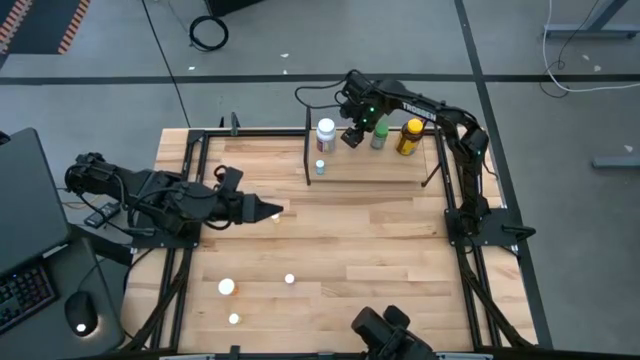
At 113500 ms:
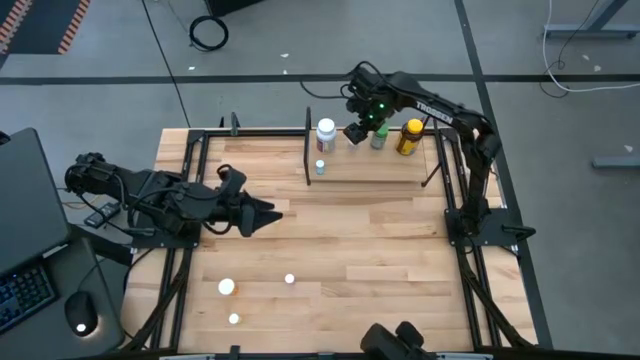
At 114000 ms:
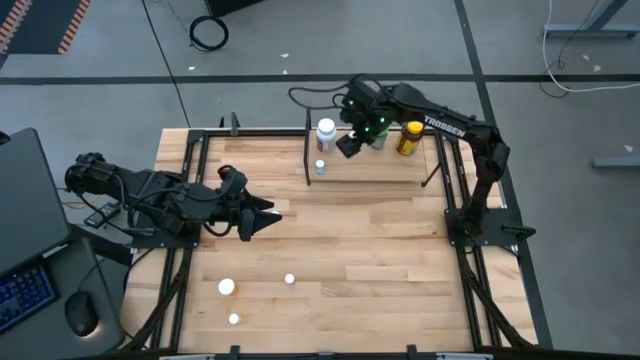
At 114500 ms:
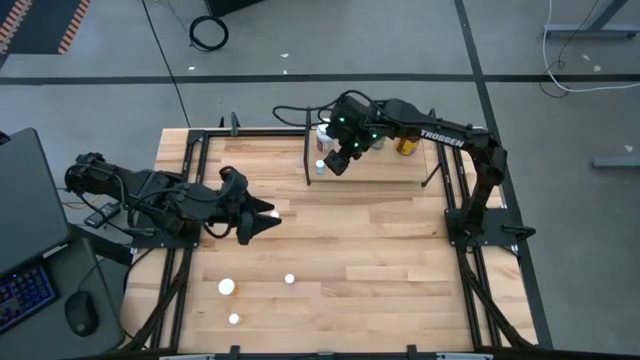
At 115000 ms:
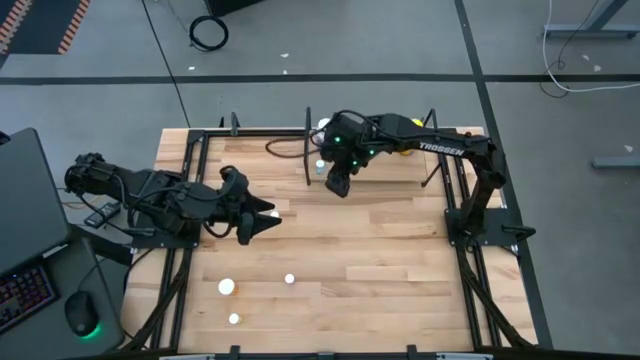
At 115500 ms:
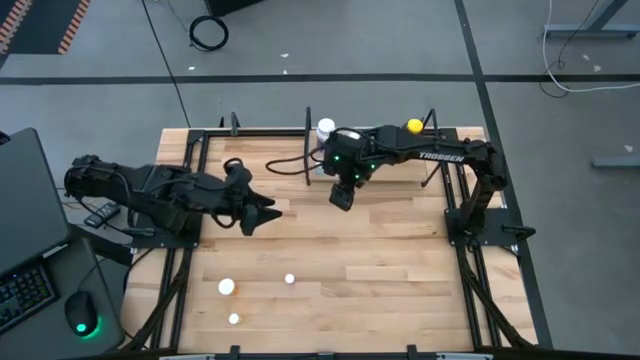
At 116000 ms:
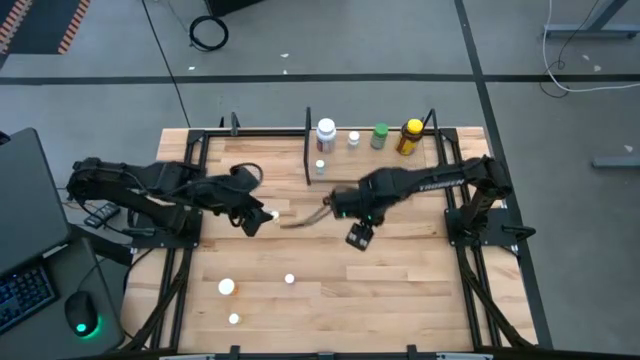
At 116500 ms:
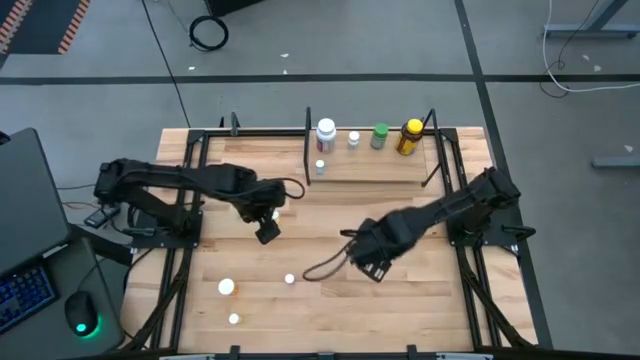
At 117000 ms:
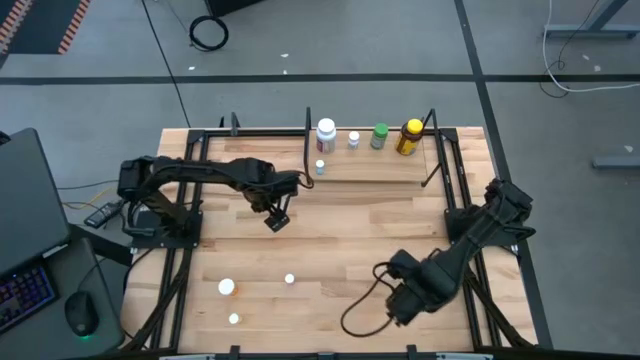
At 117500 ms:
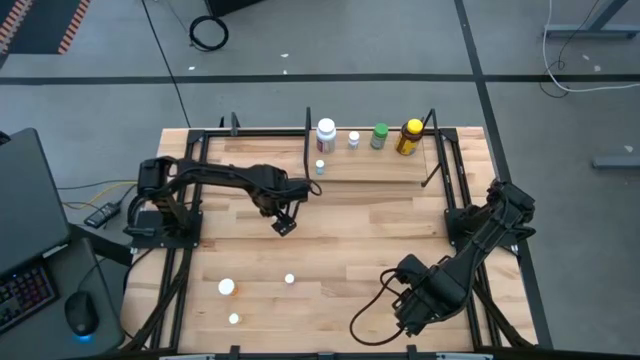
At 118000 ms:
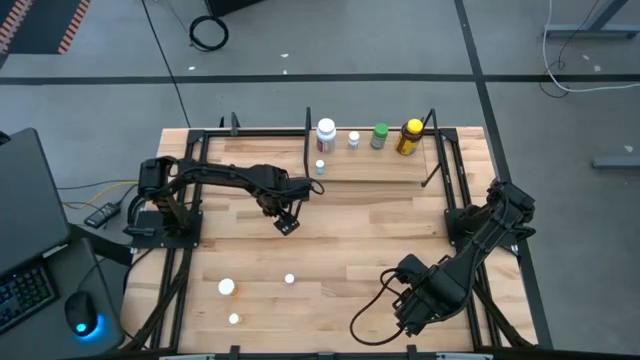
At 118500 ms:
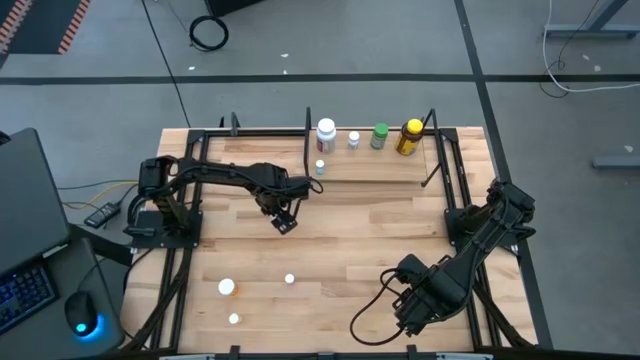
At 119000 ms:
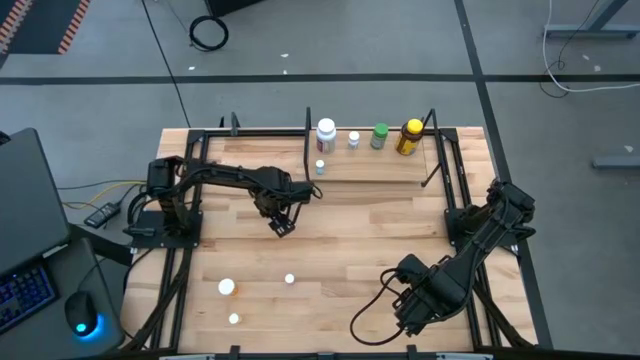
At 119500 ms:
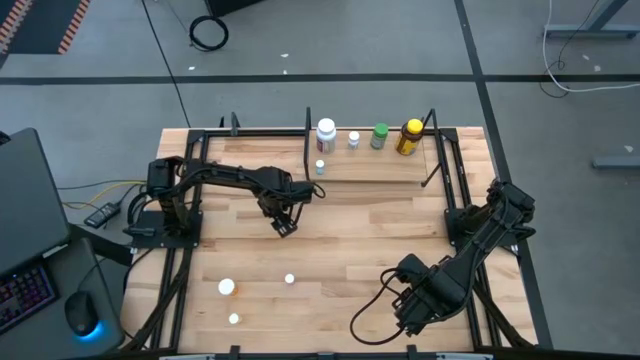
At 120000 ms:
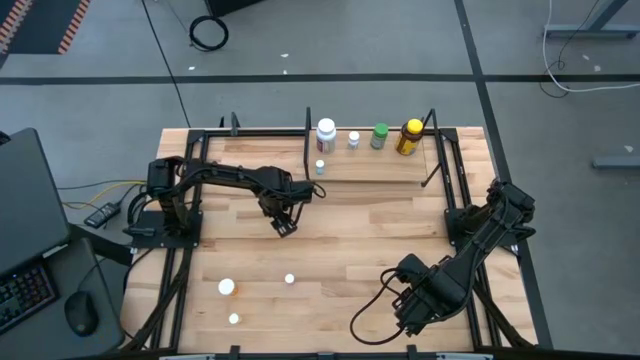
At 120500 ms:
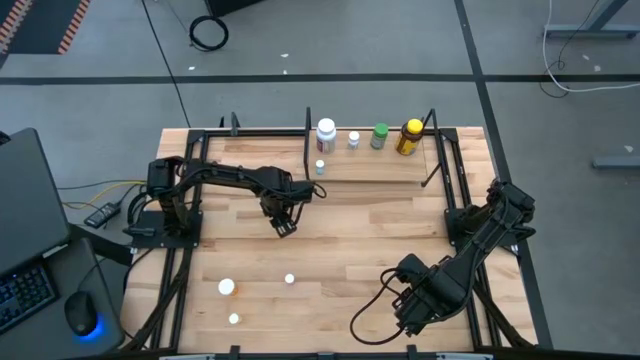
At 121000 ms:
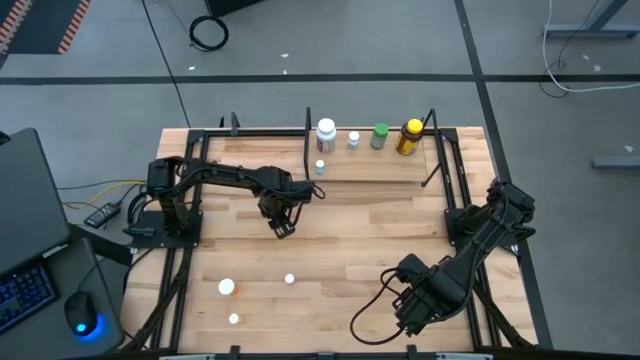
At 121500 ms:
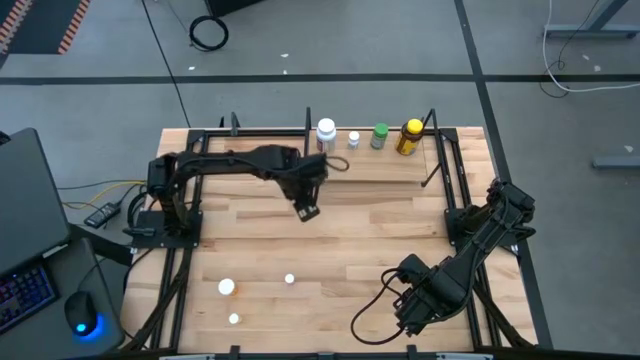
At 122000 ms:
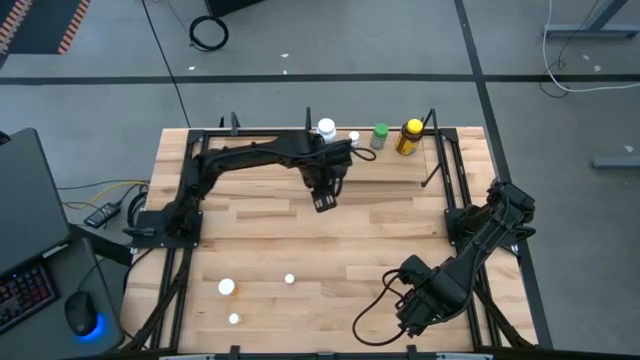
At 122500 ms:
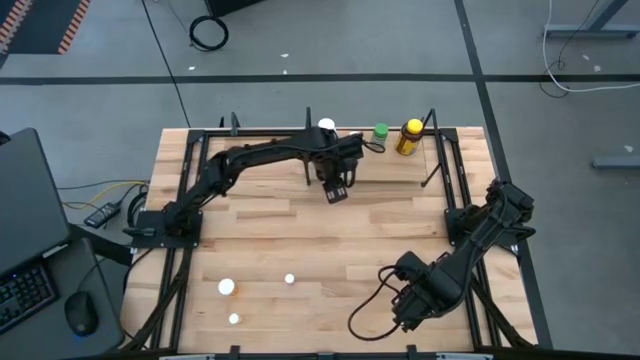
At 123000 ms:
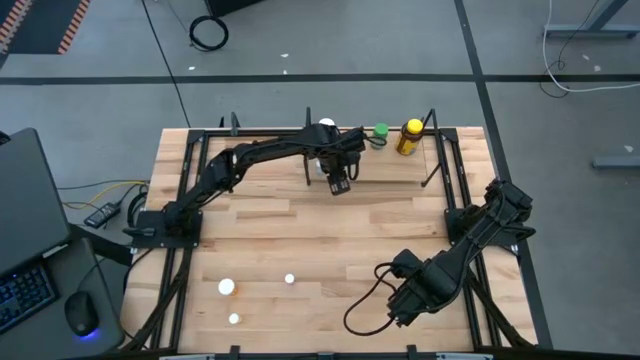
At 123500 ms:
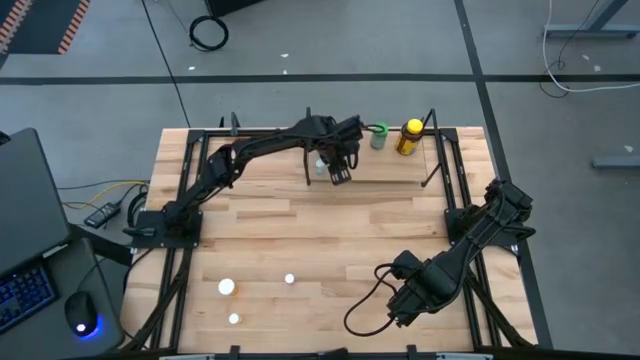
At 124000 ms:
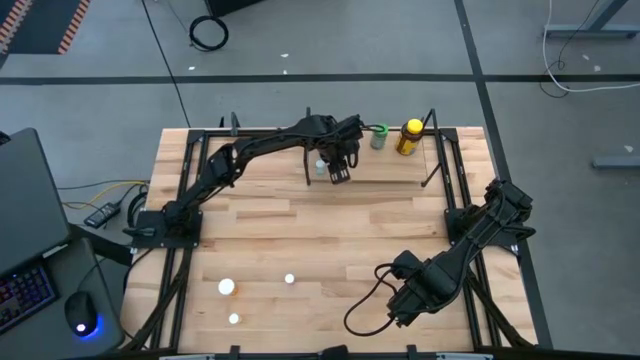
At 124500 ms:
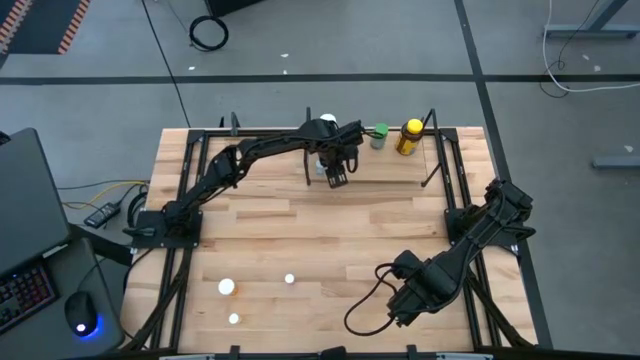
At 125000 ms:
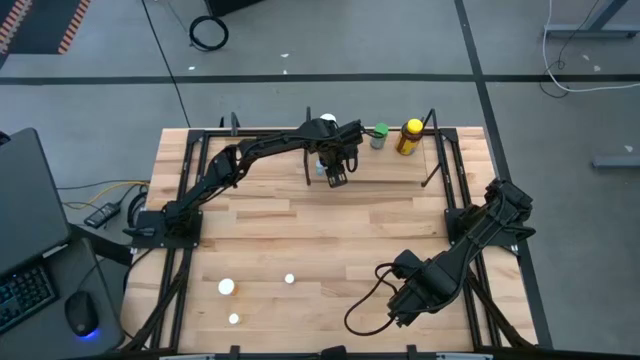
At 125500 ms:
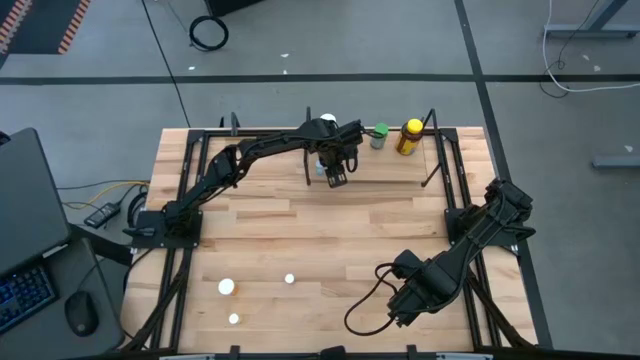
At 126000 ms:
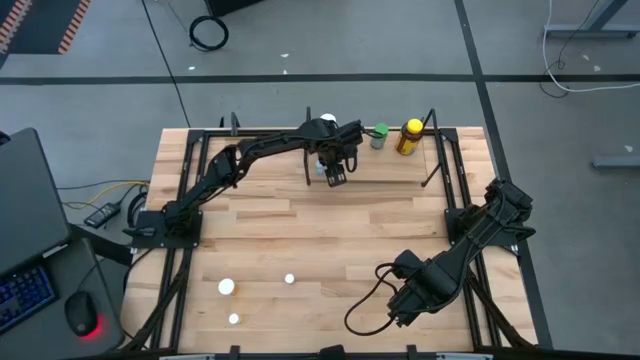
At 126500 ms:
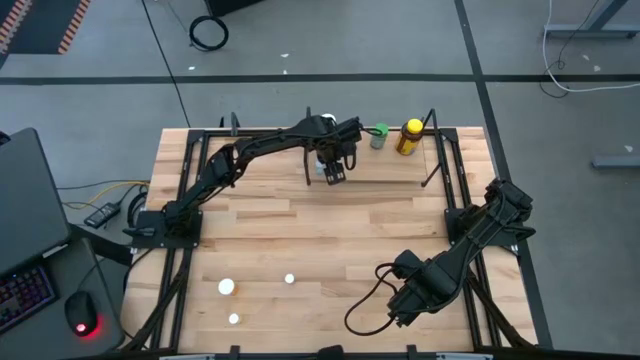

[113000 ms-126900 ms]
Task: Pick and place medicine bottles onto shelf by color
Put the top small yellow pill bottle on the shelf

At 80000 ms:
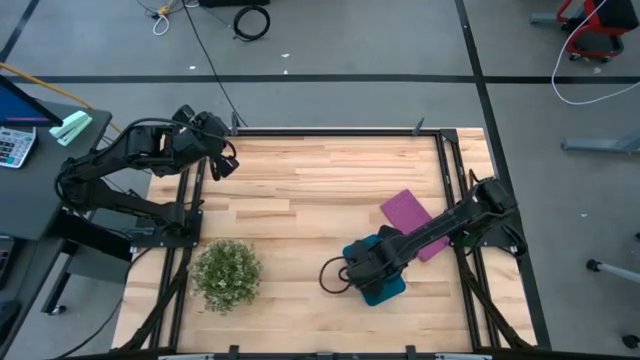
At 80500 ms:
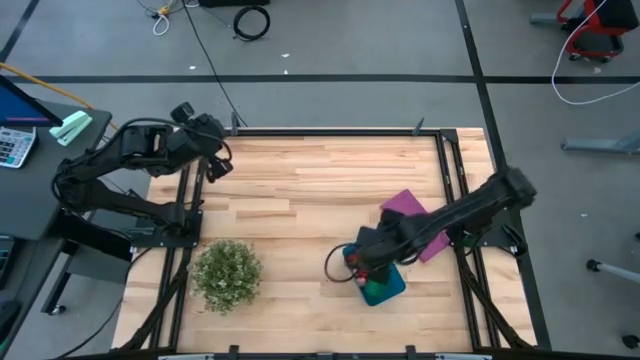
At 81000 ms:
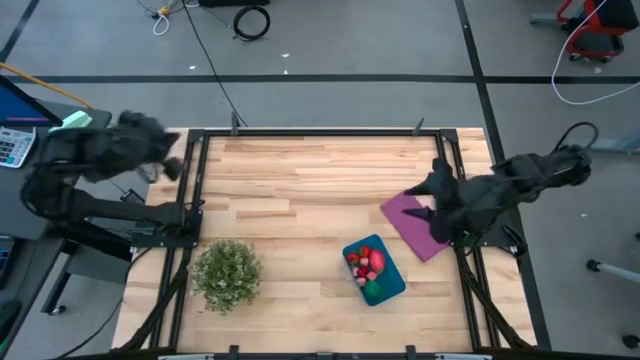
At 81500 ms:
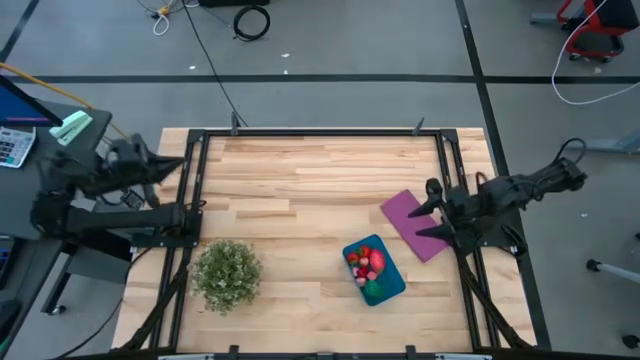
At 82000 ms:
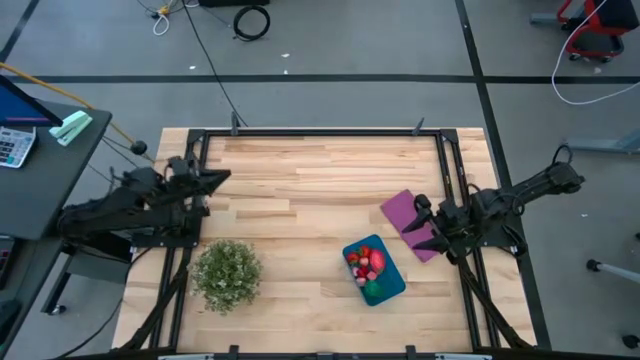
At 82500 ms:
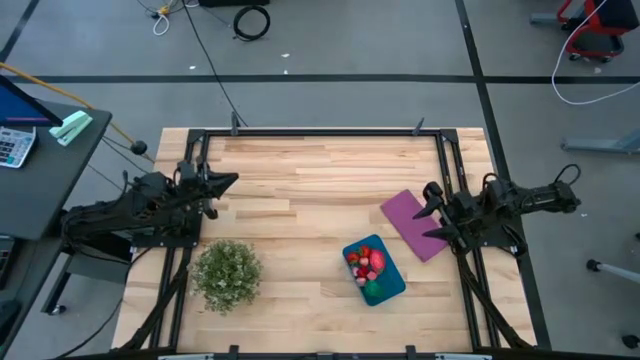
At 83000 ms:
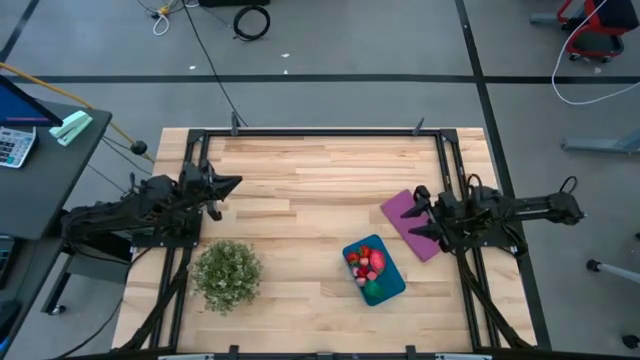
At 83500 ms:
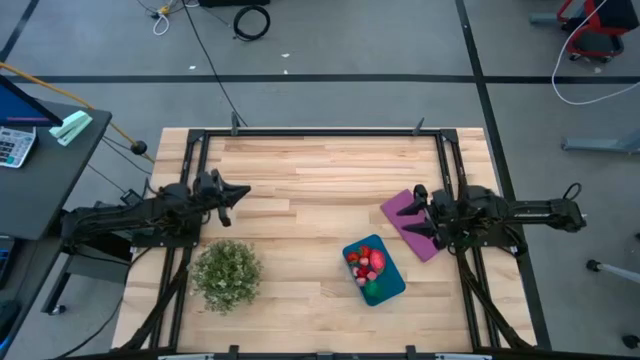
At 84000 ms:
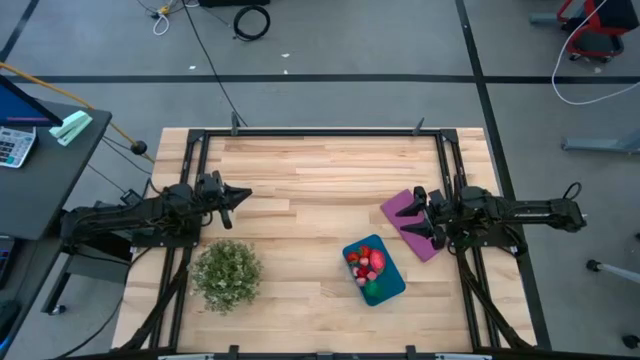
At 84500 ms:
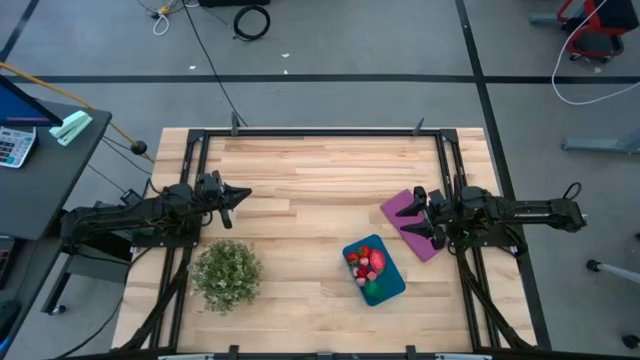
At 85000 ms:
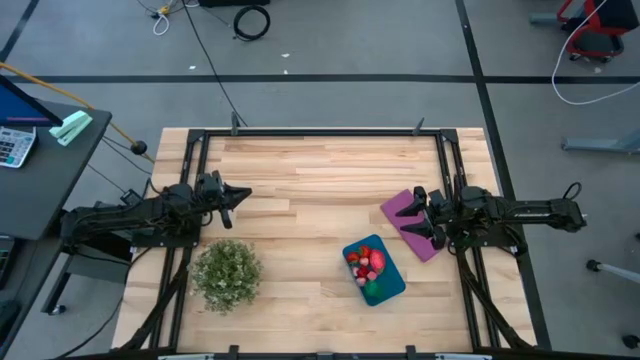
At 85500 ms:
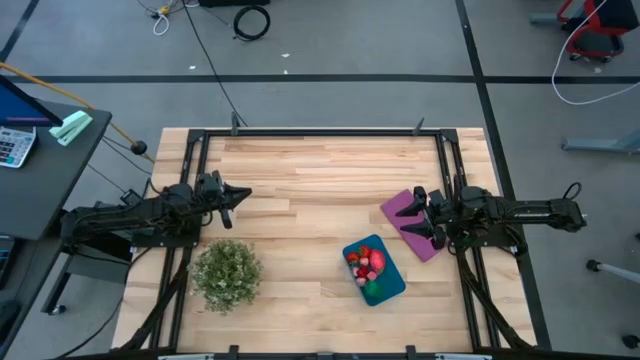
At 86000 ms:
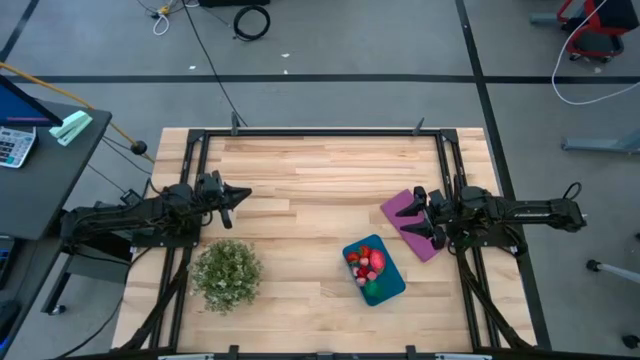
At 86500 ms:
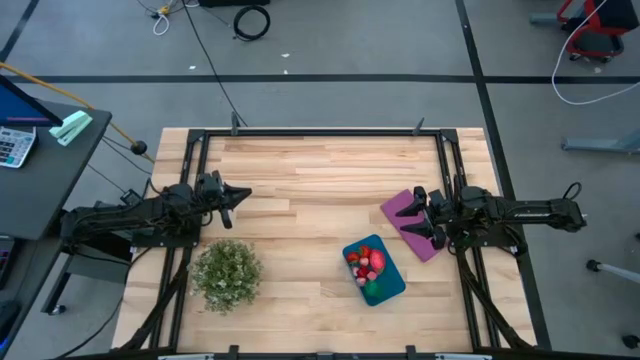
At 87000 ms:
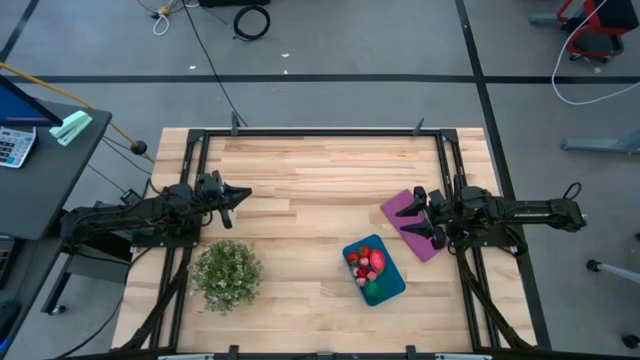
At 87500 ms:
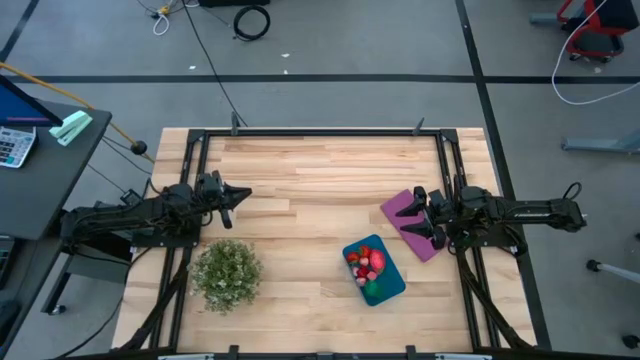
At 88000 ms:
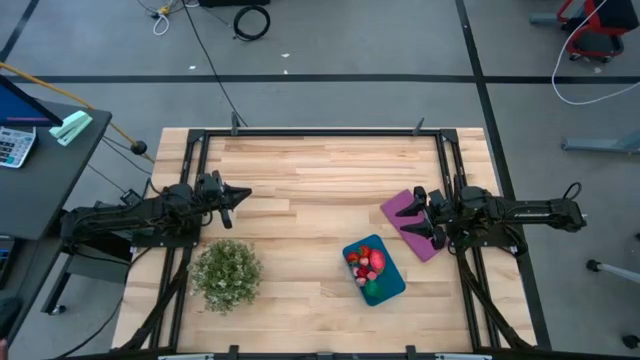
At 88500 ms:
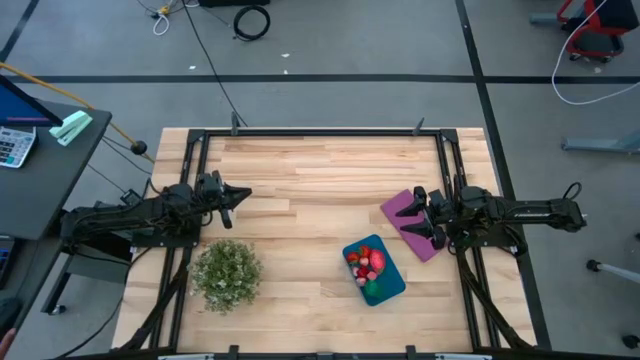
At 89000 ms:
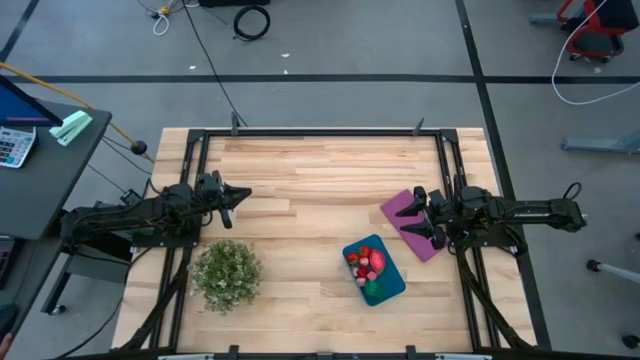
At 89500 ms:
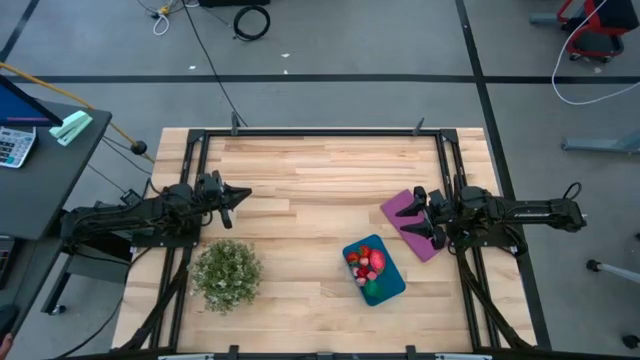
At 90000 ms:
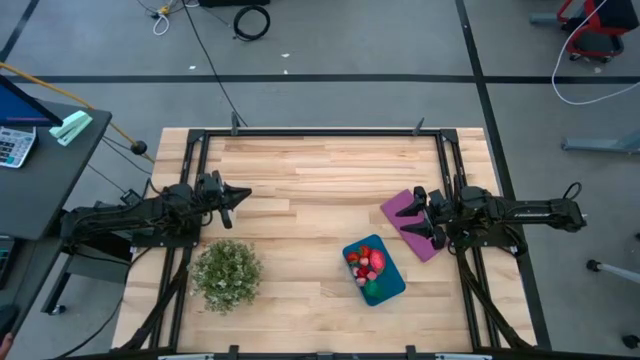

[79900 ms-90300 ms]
Task: Pick and placing Produce into tupperware
Return to Home Position
